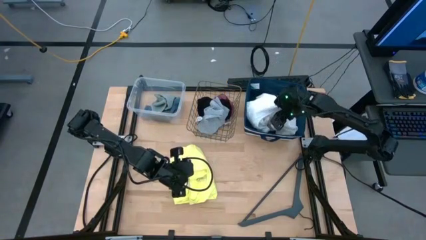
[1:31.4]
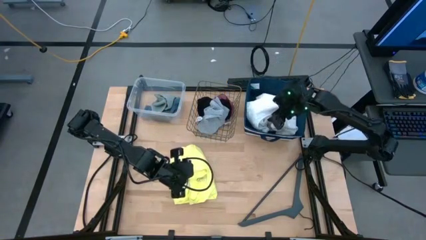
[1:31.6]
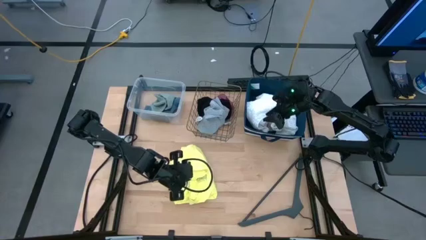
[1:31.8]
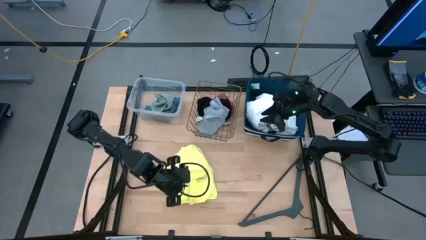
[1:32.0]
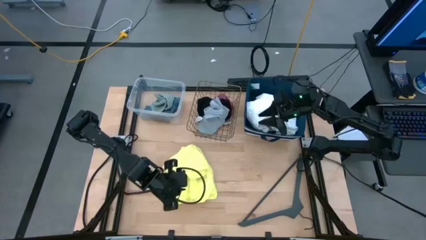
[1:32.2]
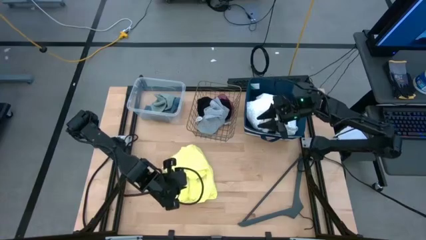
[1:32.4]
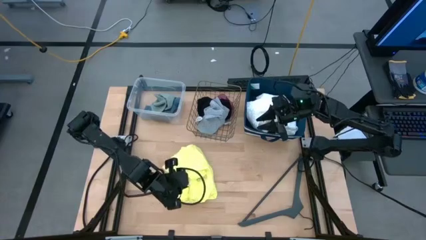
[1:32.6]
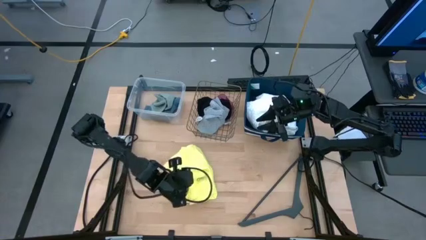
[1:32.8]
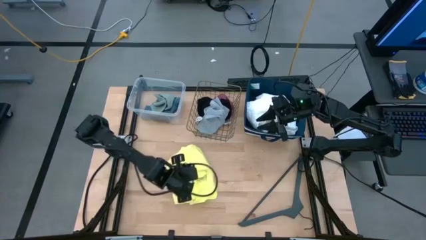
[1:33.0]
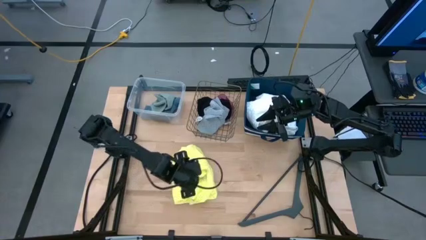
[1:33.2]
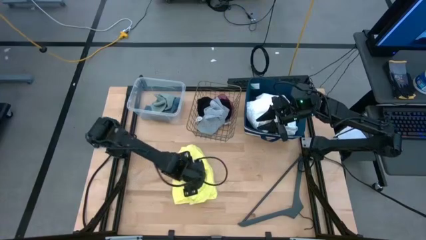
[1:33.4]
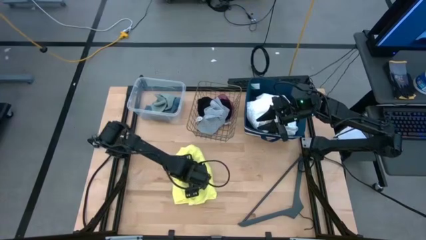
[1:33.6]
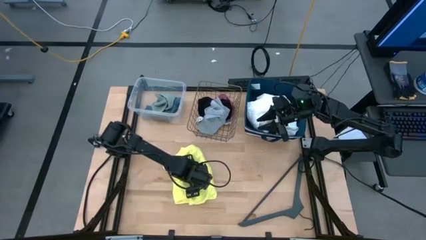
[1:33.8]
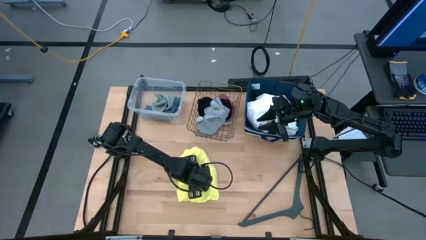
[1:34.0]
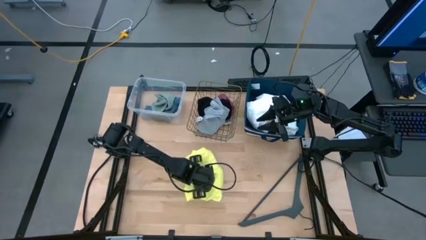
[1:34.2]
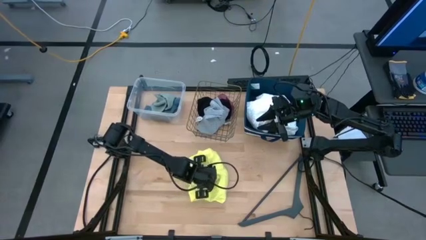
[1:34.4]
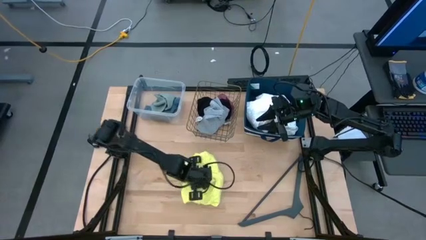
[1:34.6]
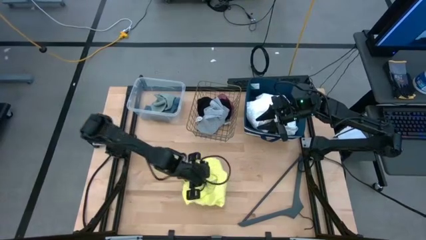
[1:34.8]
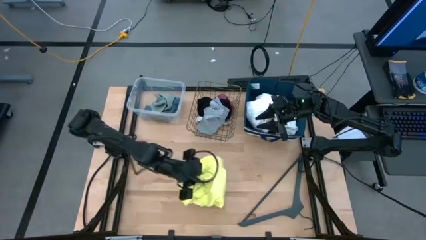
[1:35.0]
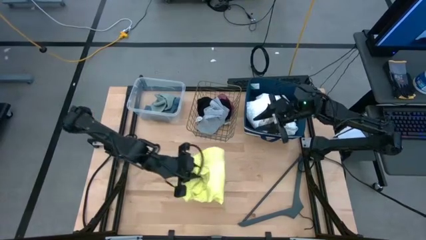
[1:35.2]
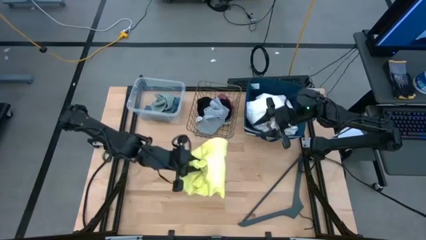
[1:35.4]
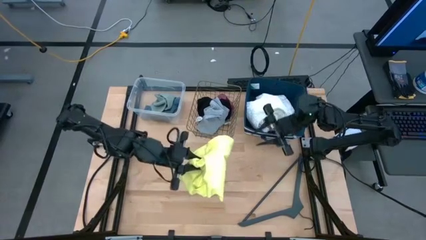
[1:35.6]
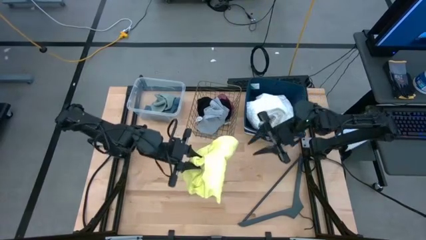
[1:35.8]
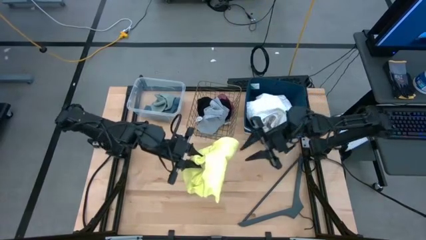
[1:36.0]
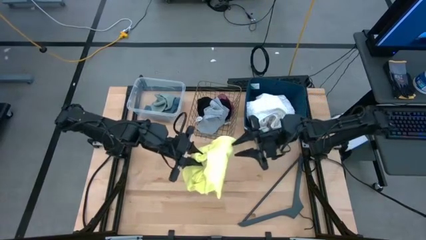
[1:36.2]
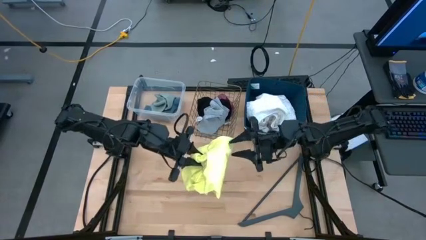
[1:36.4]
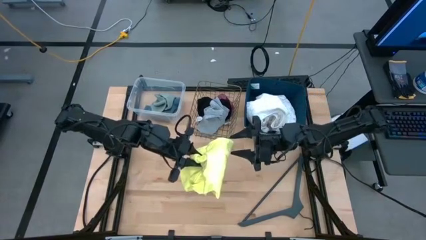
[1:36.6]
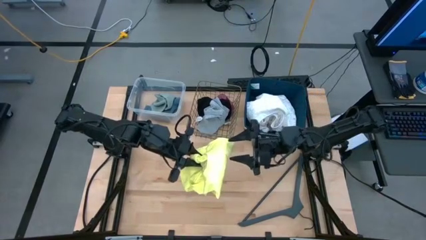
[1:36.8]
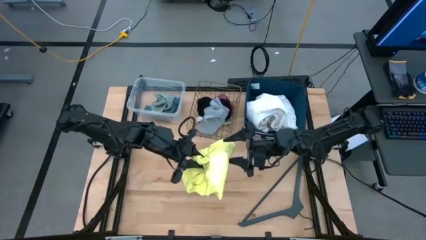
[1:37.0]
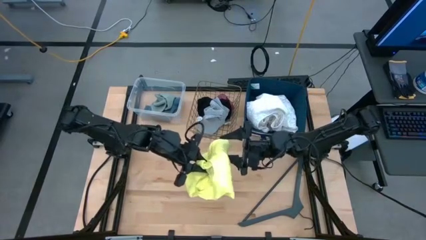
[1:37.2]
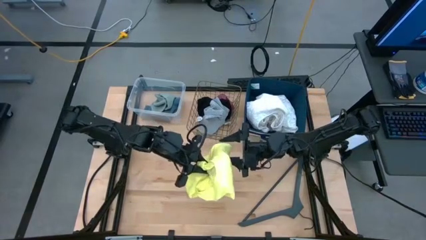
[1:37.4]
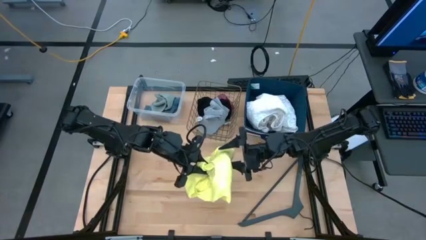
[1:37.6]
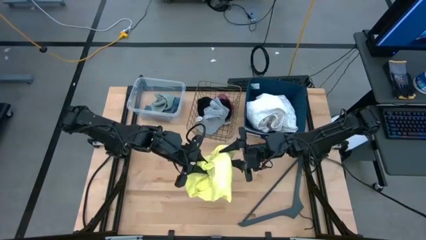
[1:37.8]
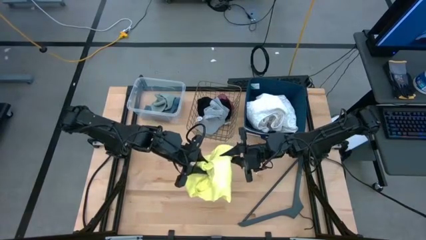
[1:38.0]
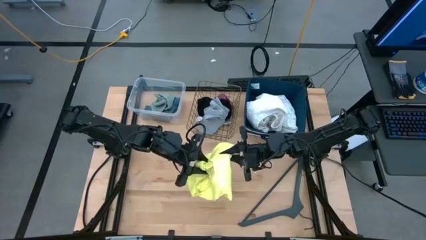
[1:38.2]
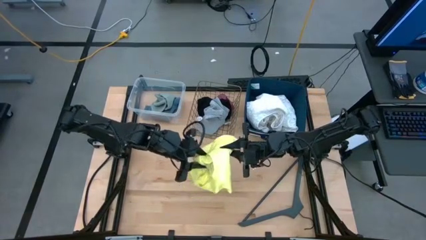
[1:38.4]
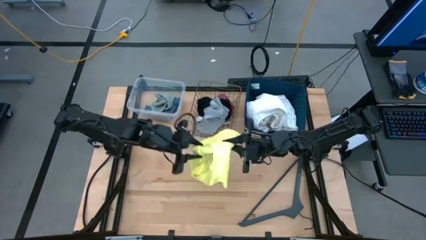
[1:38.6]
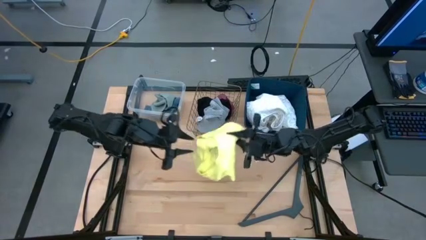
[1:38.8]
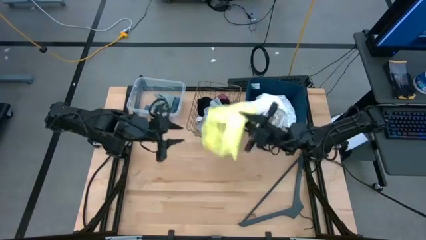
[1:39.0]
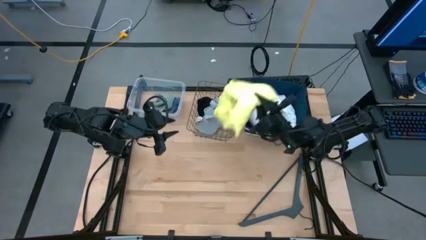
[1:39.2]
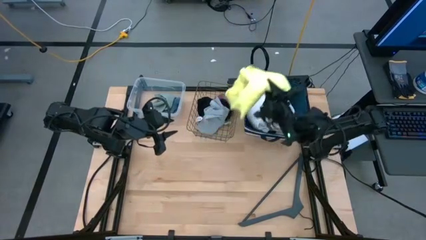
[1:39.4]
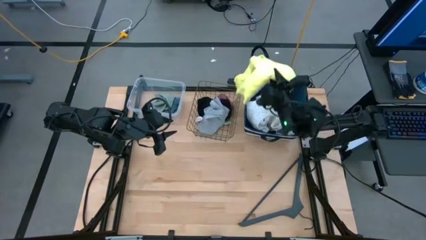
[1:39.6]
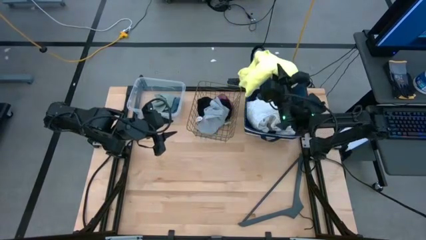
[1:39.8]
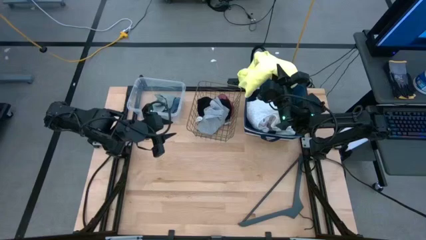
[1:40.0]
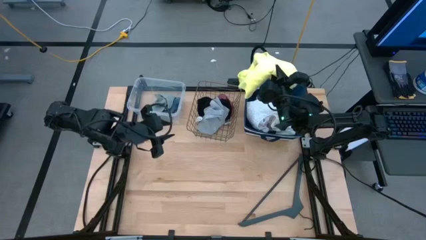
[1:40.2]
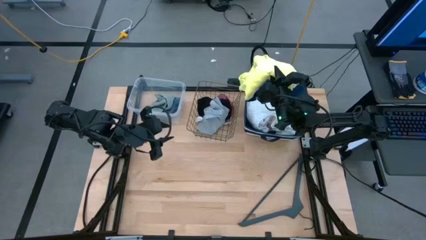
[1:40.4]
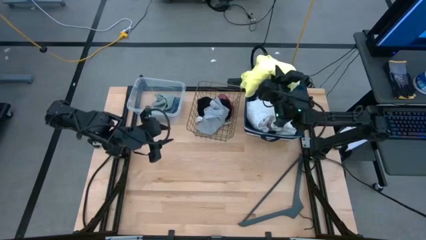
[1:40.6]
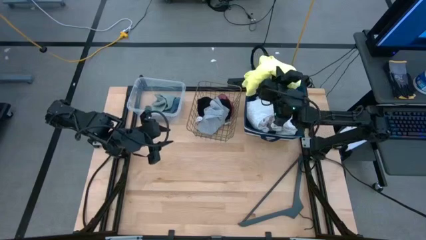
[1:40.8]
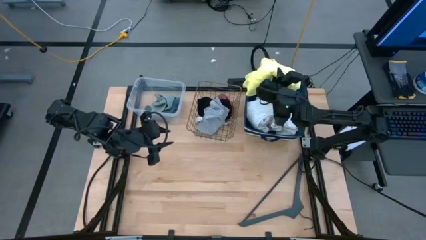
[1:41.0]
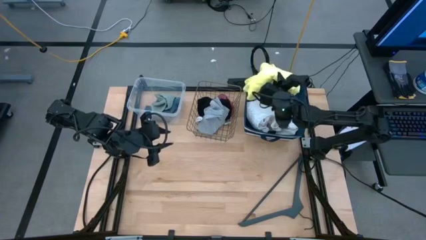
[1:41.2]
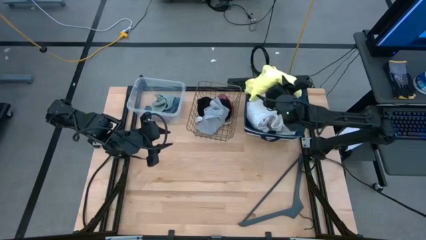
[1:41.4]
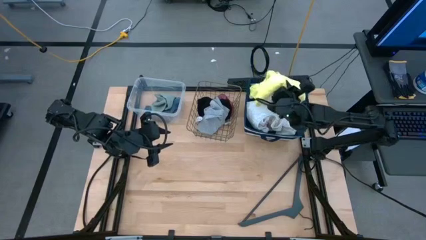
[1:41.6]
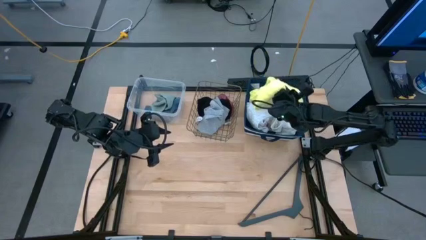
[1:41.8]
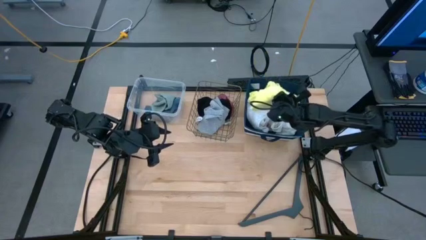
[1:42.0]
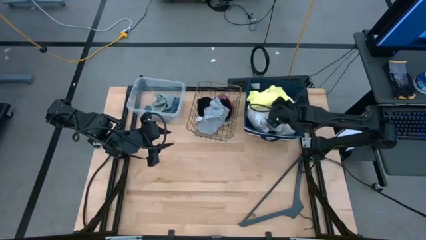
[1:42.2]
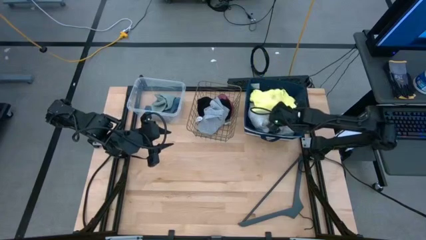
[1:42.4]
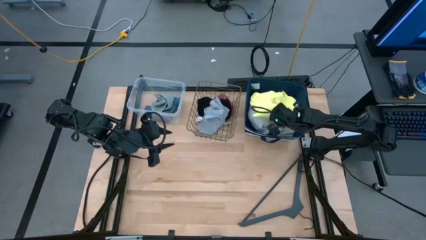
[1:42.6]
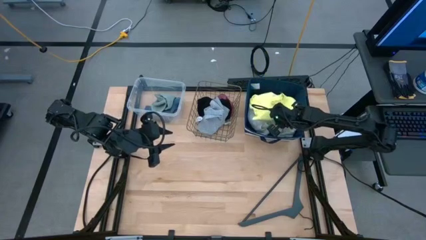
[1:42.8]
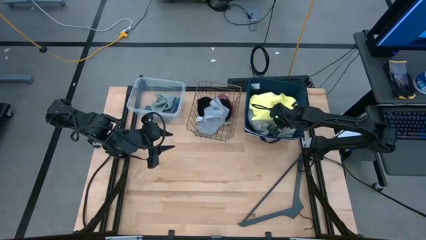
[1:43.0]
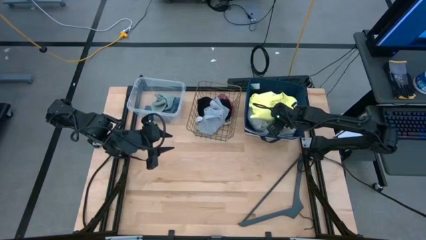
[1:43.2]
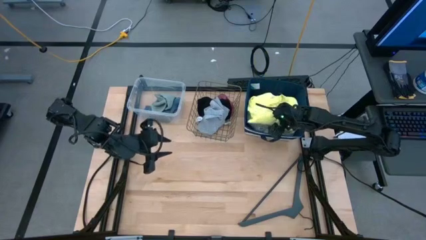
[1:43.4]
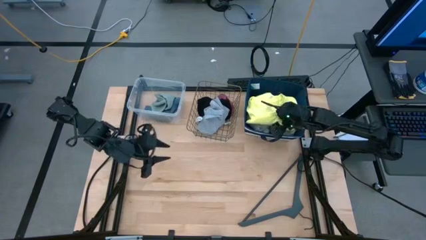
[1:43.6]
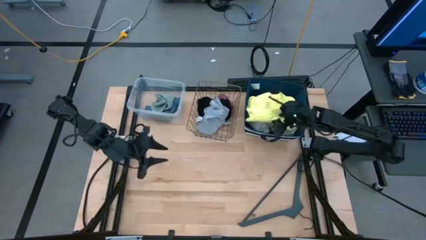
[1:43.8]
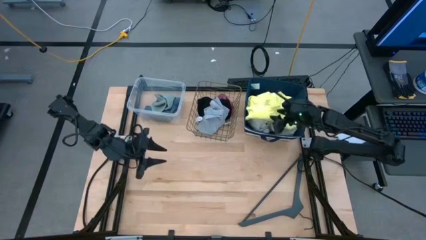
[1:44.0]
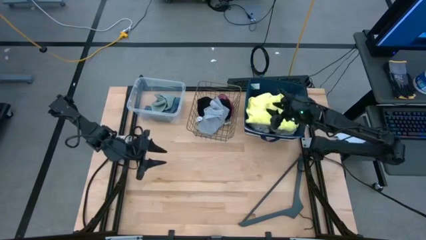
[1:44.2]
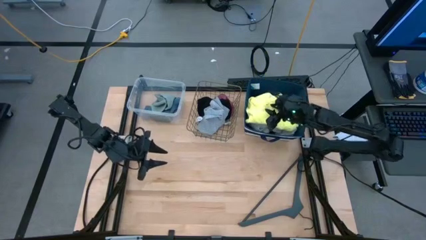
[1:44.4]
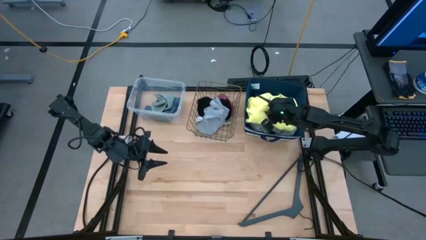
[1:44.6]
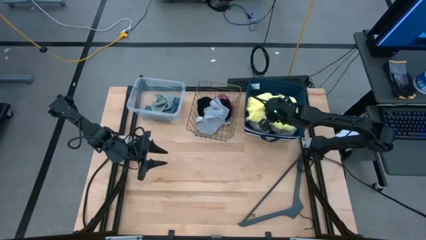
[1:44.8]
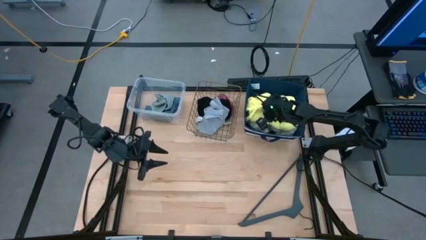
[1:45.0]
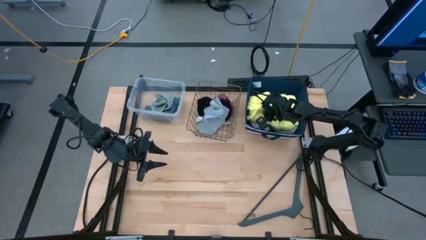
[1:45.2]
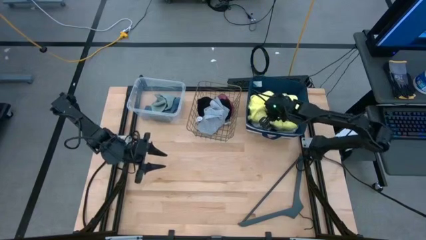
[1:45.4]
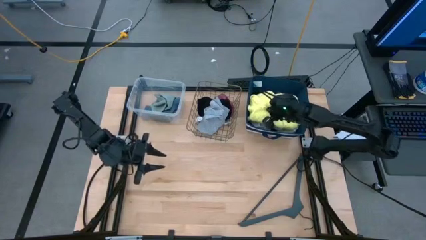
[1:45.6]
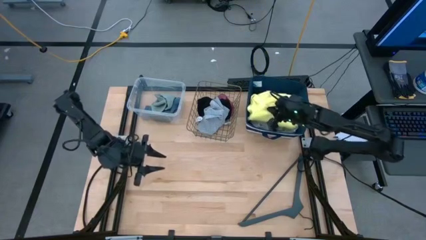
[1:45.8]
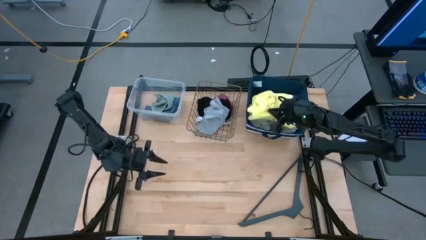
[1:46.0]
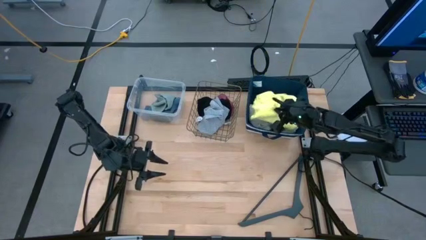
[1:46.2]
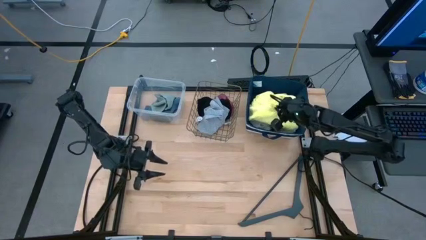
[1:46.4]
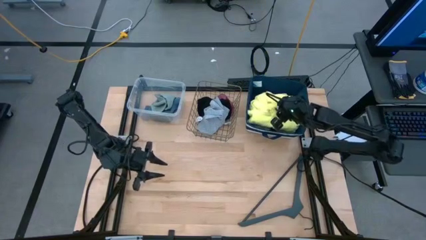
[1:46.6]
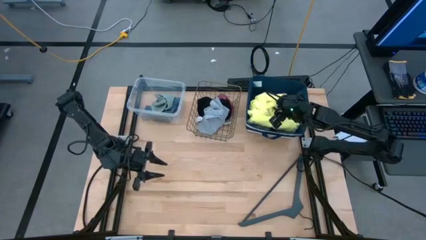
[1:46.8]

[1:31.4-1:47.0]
Task: Pick & Place Cloths
Put the yellow shirt into the blue bin

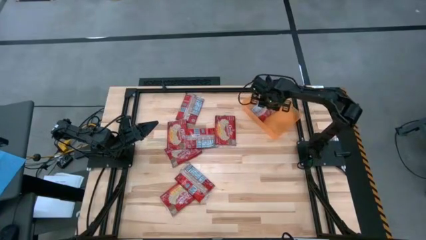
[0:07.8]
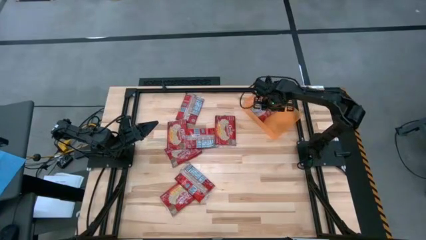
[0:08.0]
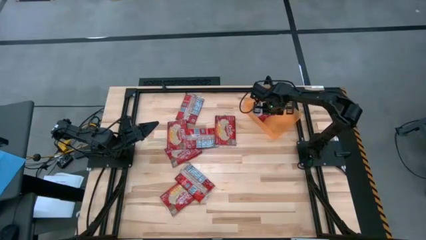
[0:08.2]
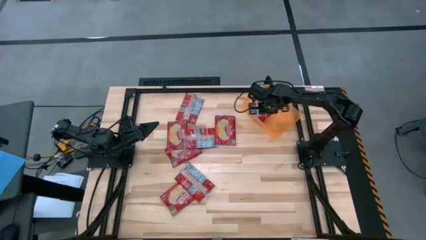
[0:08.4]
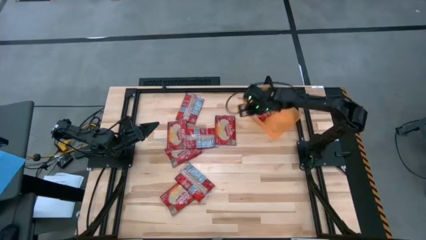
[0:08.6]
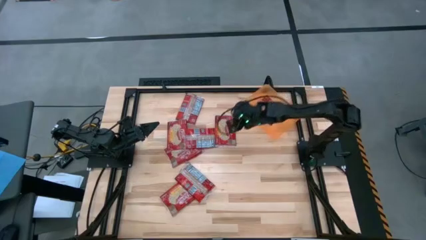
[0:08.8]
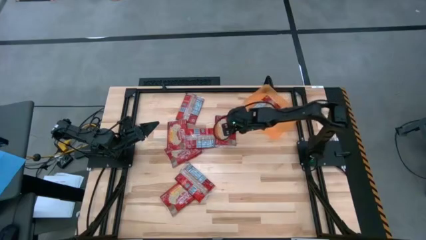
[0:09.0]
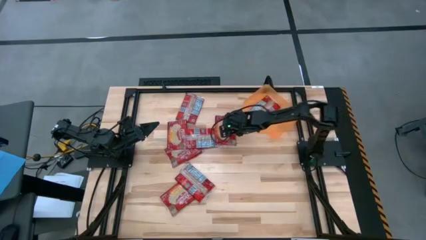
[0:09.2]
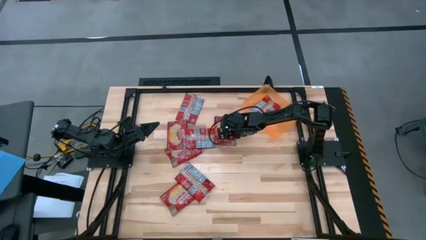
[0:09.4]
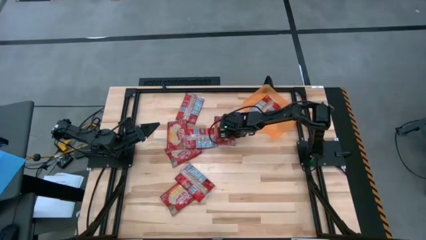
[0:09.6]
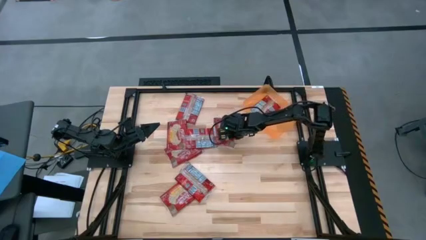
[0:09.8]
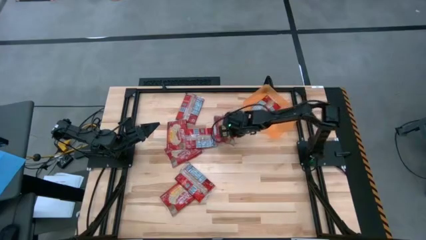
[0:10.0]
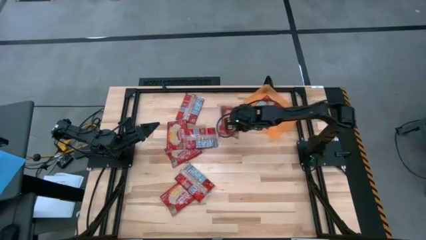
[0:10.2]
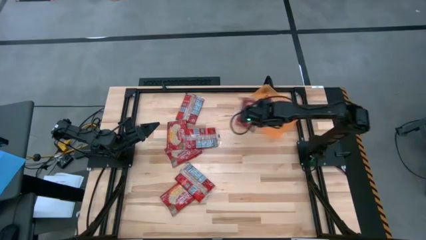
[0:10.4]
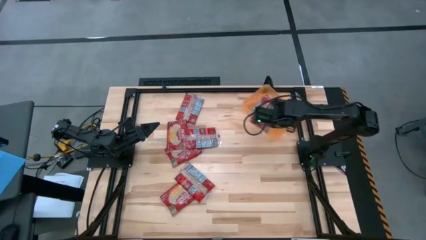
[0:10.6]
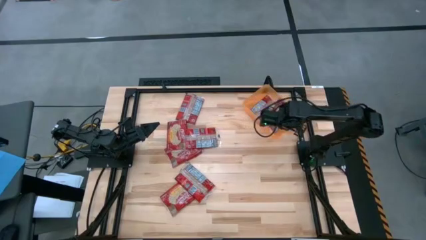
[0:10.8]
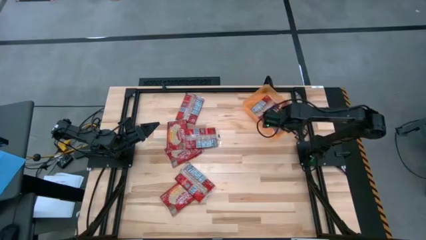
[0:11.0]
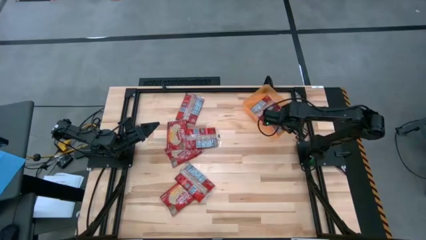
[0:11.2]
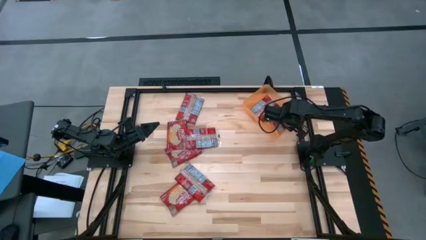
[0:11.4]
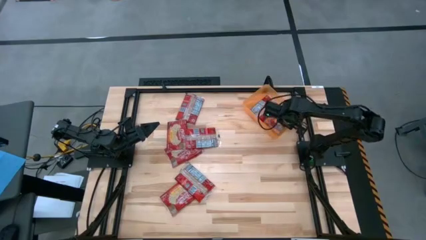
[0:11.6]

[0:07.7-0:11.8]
Task: Sort popcorn bags into baskets
Put the red popcorn bag into the orange bin
